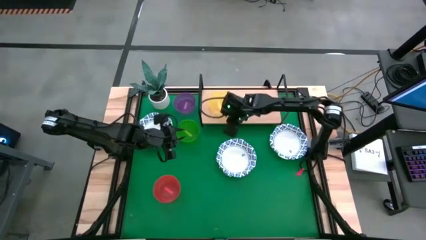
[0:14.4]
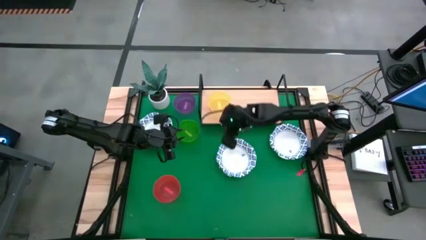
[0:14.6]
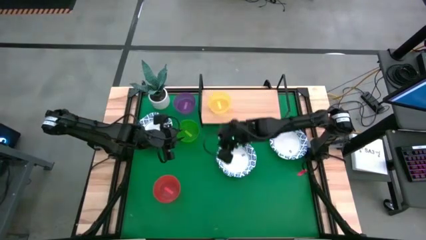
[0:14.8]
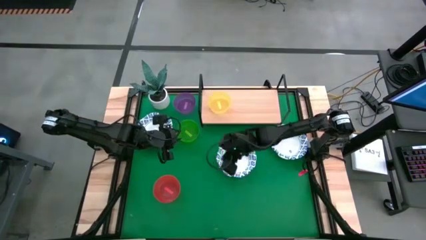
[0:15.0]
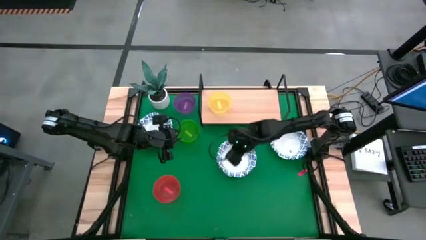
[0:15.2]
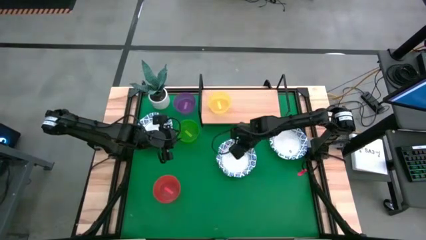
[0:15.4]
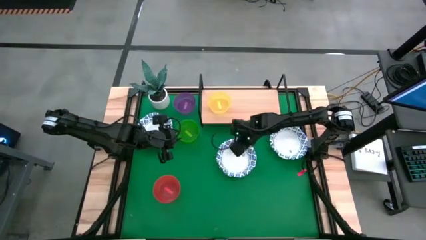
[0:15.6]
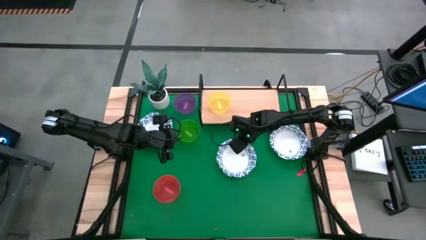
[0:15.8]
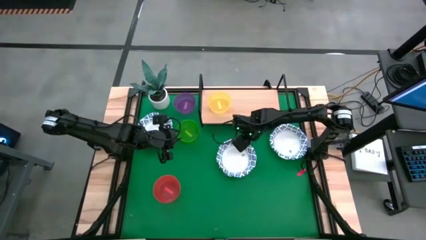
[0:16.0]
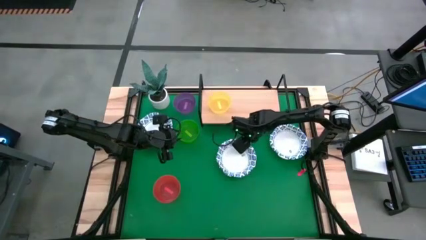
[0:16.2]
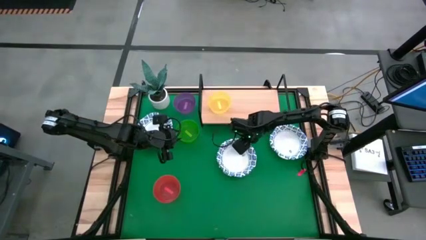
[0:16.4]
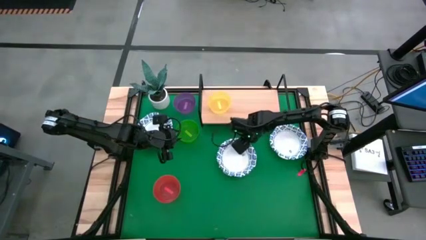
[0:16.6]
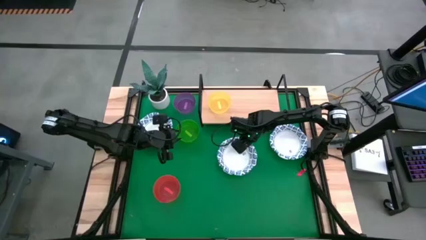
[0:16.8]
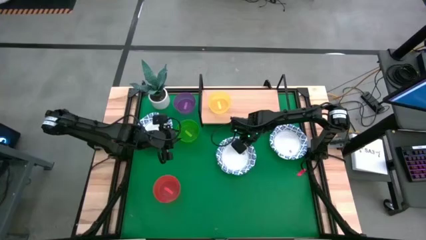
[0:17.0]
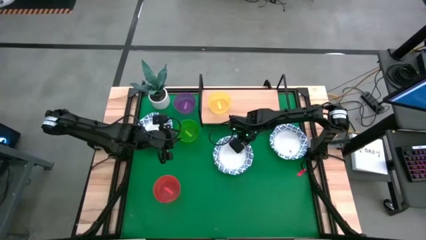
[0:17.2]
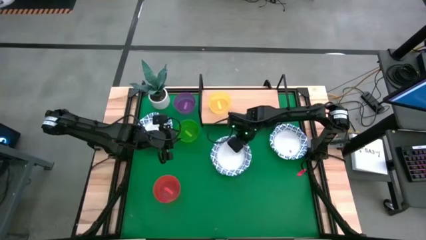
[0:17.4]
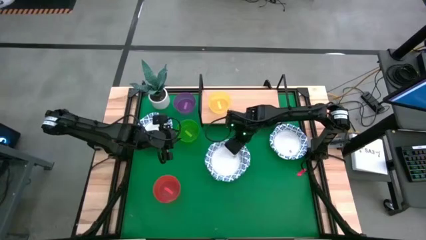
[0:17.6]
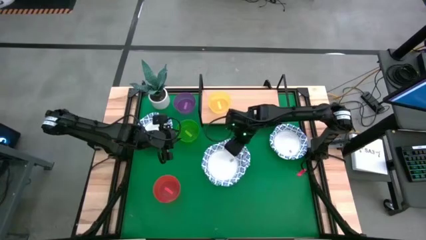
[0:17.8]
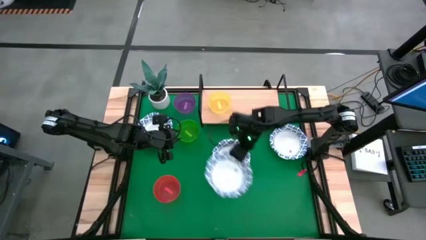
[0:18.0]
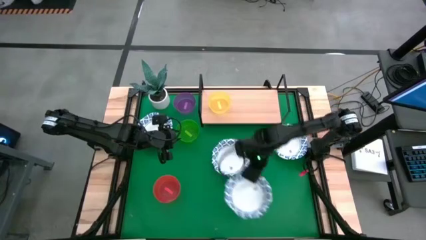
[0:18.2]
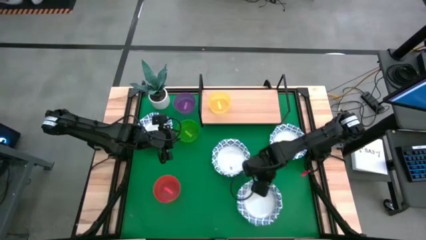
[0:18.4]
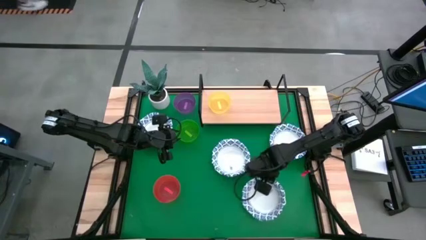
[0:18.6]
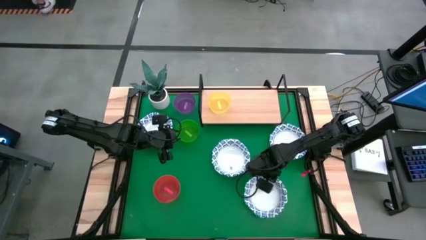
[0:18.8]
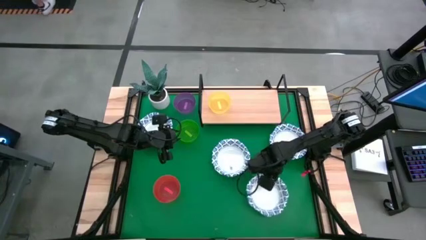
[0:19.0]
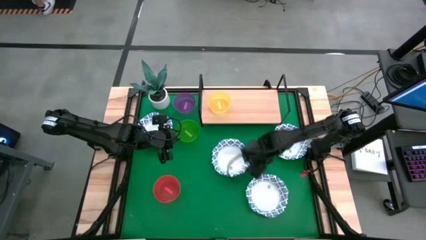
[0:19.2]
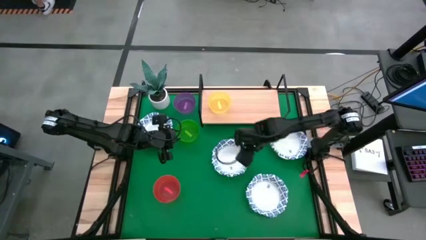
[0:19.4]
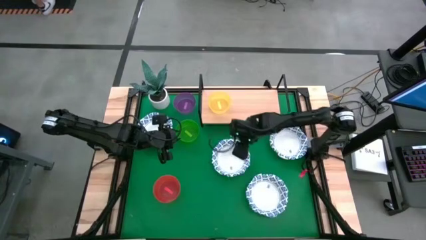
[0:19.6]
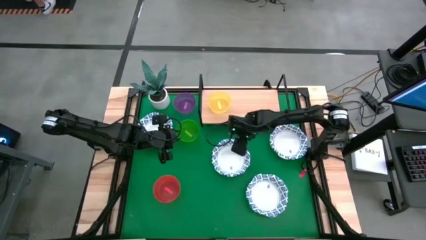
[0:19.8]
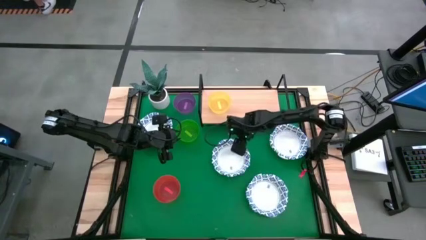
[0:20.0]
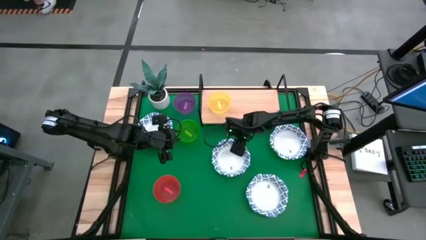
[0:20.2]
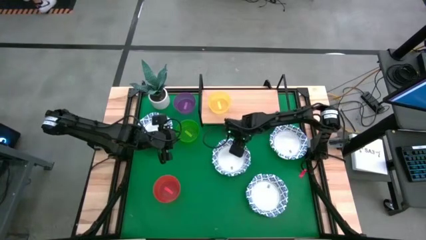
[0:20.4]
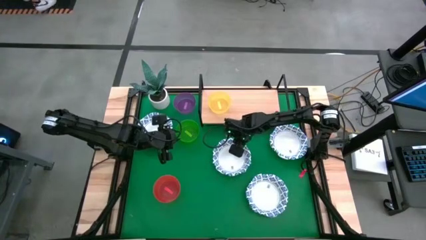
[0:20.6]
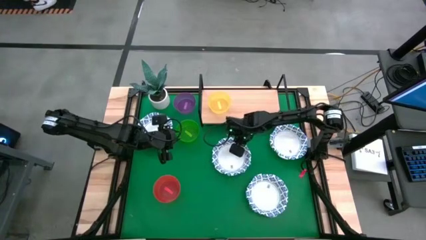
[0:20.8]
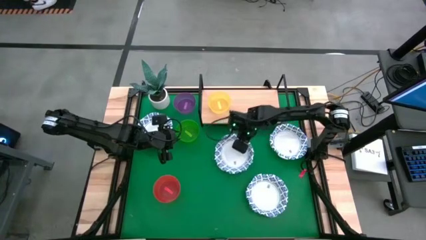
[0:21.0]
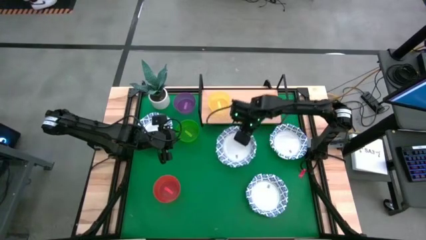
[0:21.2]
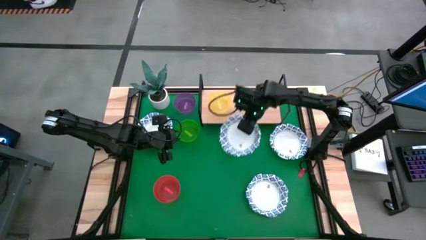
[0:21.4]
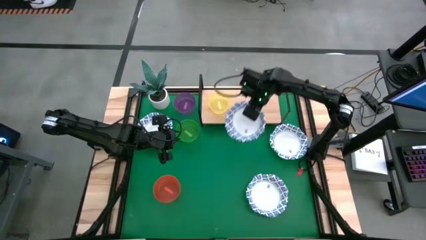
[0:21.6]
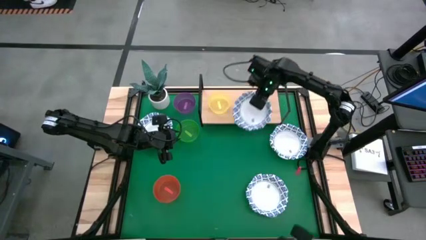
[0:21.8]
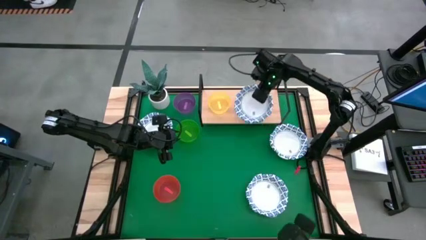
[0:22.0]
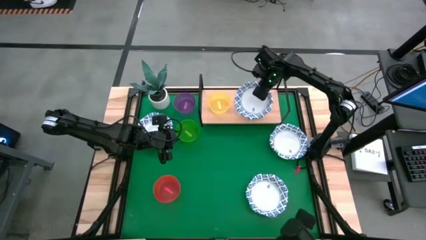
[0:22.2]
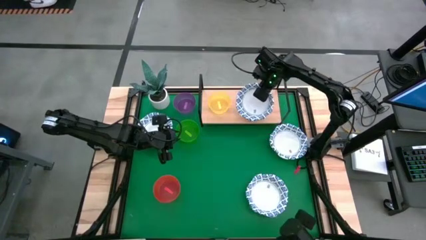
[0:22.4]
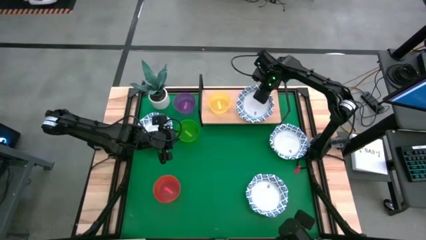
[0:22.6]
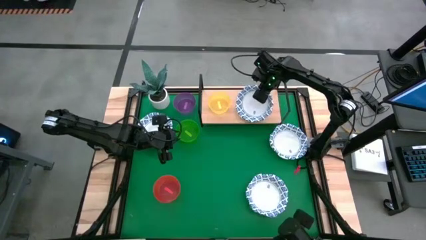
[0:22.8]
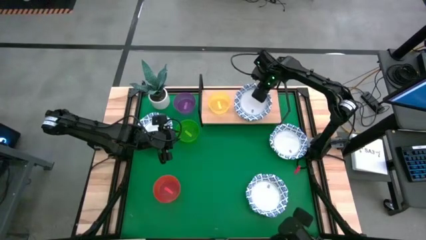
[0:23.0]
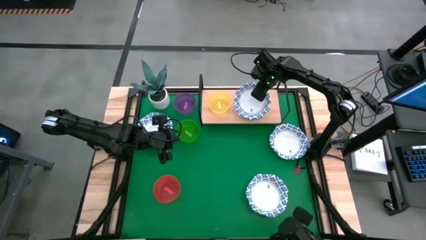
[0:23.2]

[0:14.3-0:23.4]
Task: Place and stack bowls onto a shelf
Put the white bowl under the other middle white bowl on the shelf

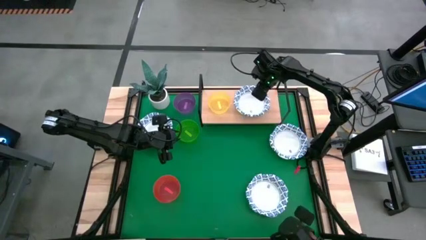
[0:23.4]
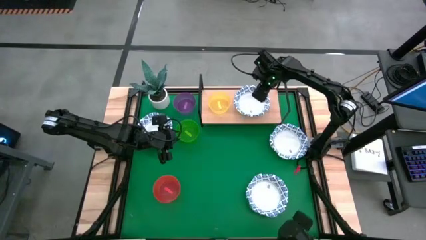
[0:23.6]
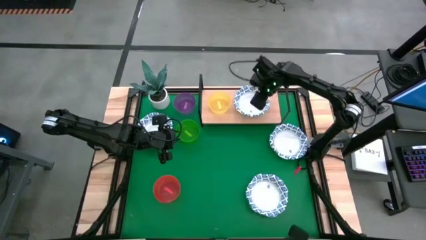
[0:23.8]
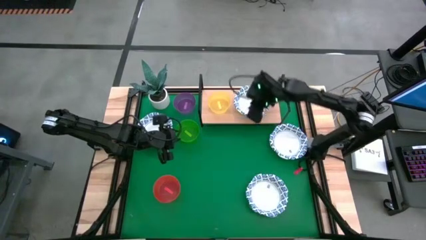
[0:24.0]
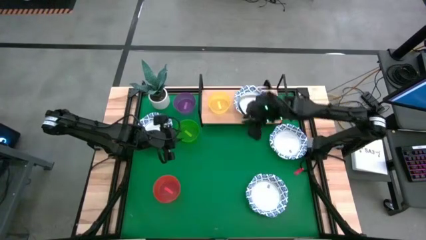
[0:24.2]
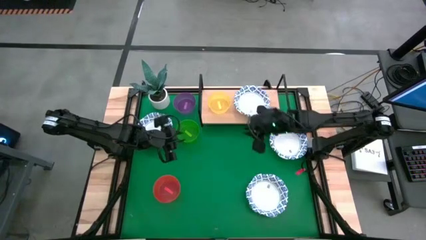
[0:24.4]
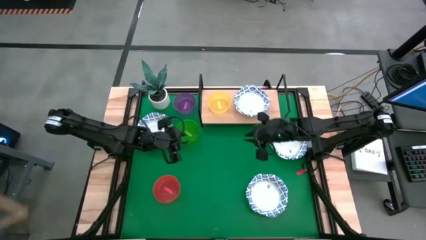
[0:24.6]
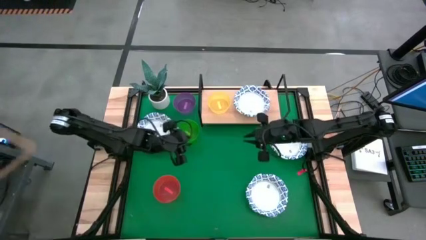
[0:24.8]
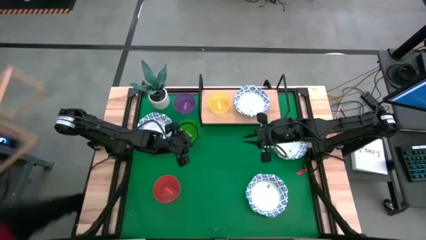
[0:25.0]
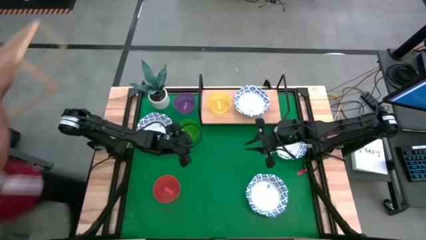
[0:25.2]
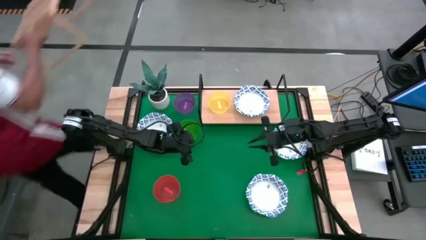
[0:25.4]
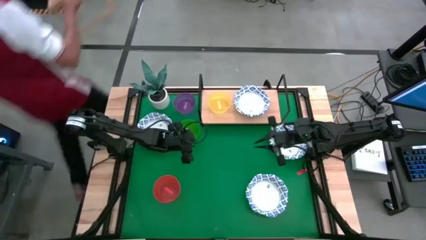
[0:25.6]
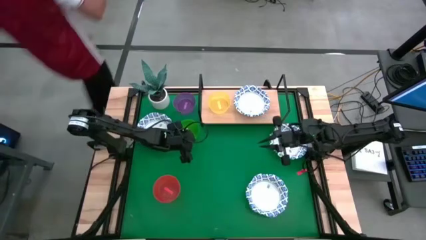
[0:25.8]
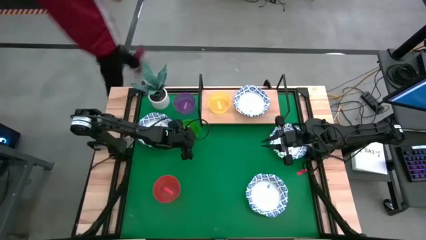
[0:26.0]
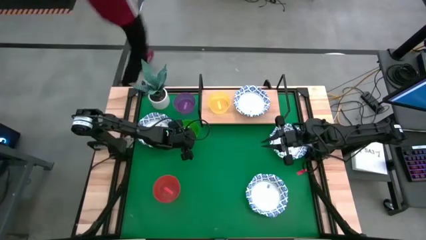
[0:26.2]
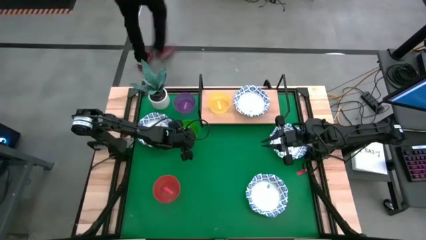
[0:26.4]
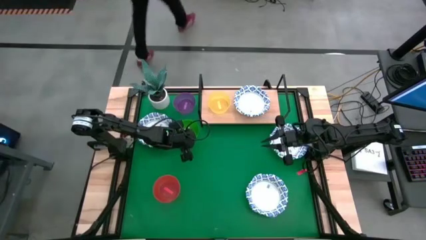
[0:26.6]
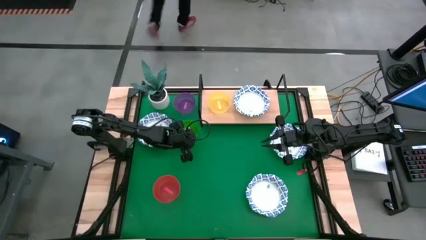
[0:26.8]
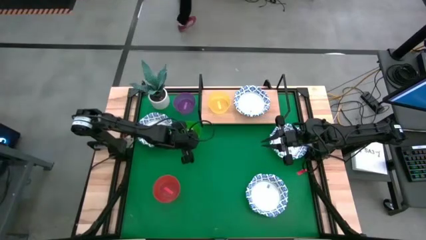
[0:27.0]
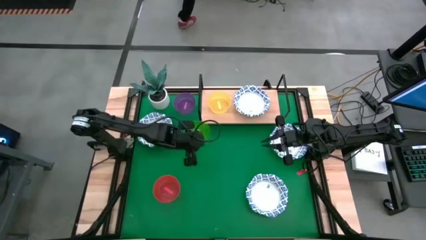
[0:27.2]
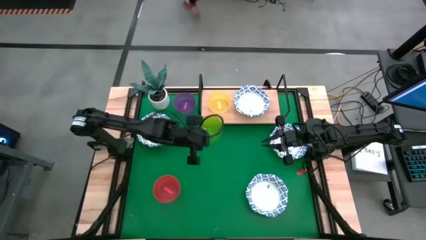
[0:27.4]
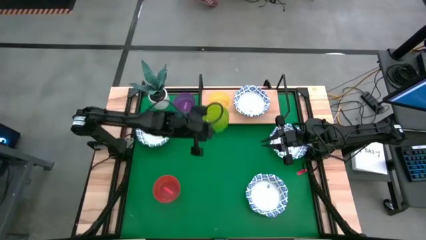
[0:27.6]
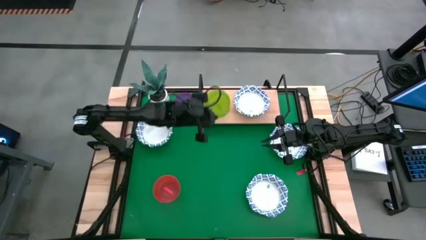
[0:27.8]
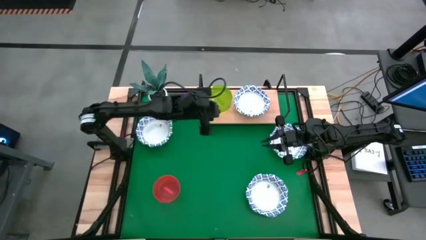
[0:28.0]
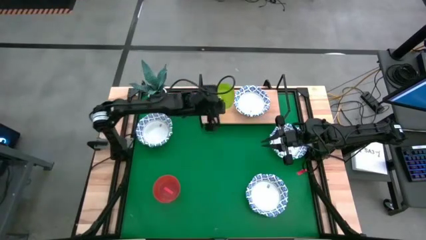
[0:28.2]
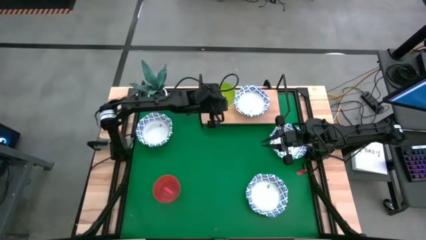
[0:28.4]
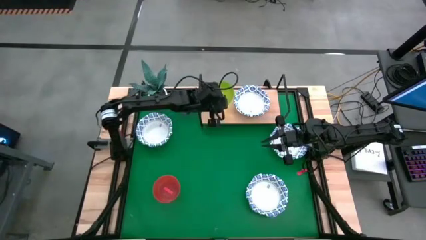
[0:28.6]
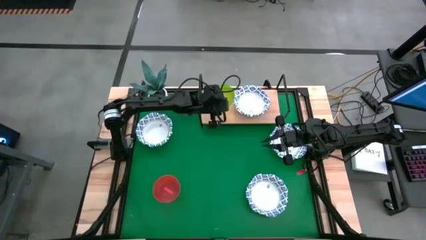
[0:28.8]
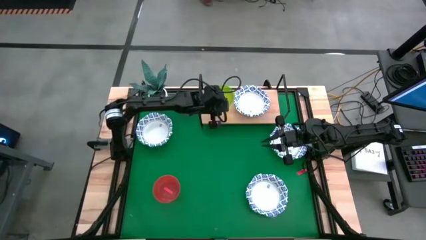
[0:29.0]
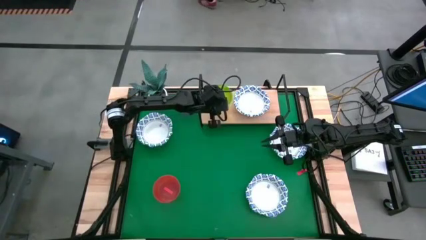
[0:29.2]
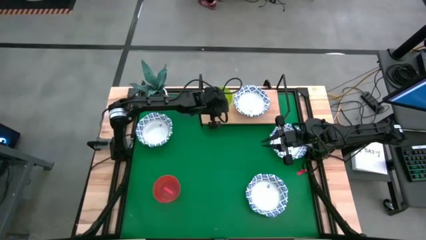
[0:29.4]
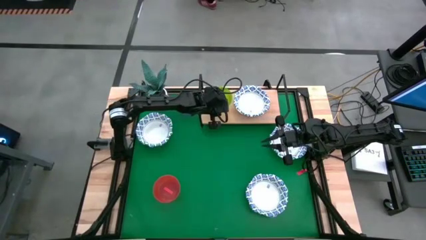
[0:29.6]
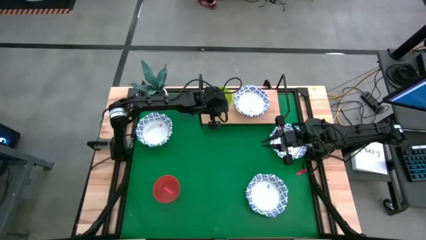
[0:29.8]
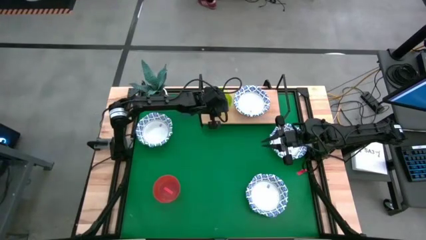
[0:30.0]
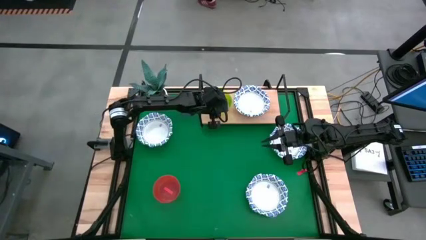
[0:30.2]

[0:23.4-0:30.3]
Stack the green bowl into the yellow bowl on the shelf

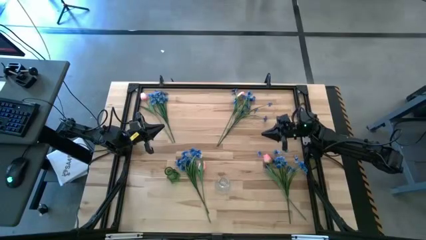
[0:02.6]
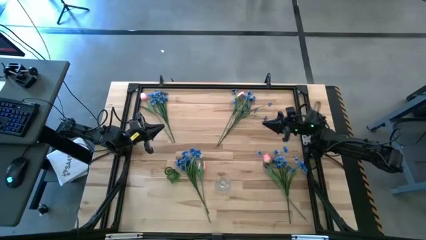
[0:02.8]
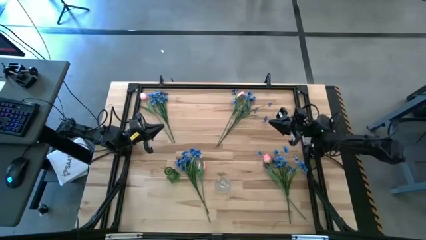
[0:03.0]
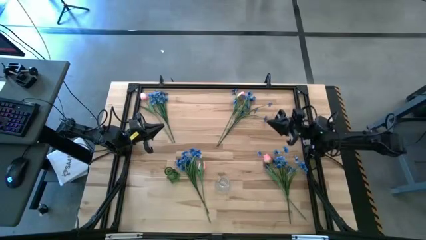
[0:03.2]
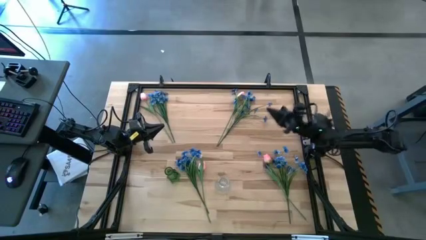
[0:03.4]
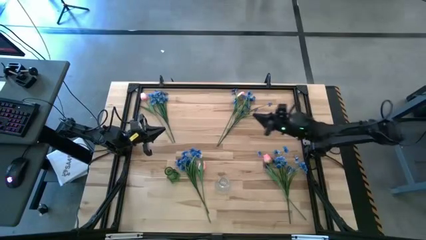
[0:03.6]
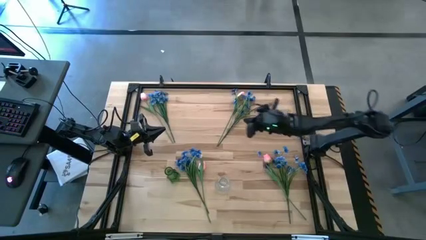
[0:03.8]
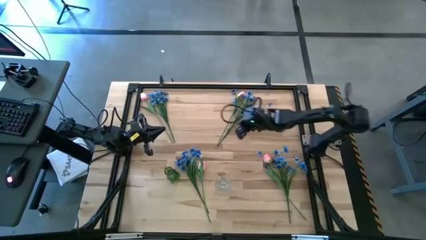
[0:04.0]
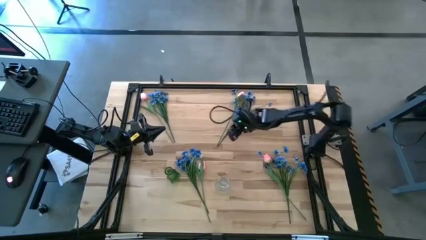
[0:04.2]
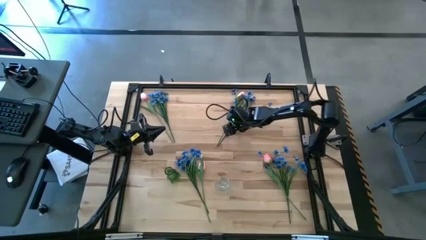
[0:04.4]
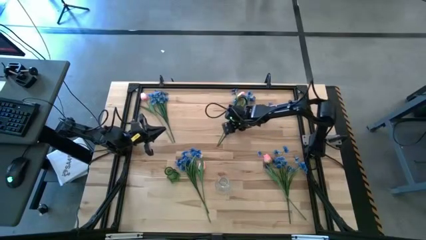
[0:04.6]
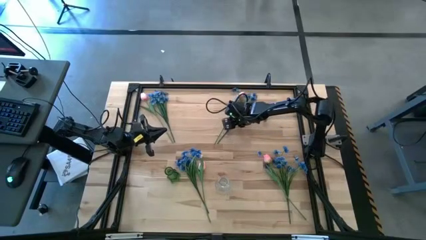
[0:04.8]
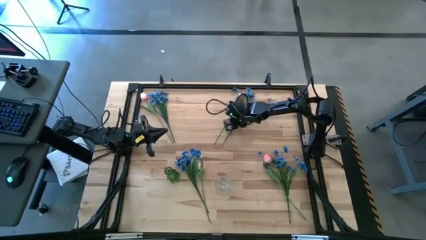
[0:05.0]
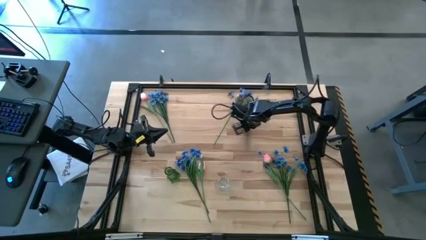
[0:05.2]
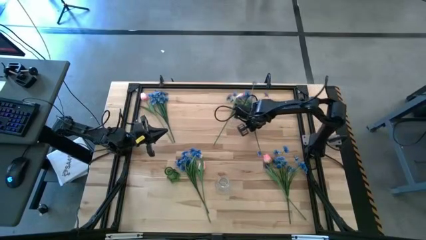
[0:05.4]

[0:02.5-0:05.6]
Task: Sort flowers into vase by color
Put the top right blue flower into the transparent vase
